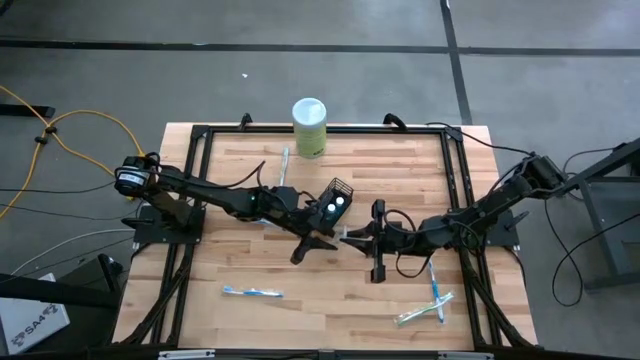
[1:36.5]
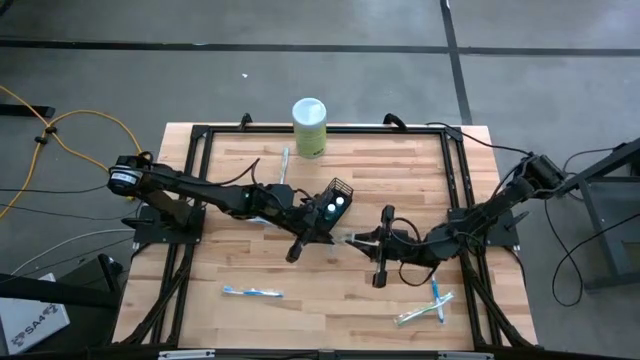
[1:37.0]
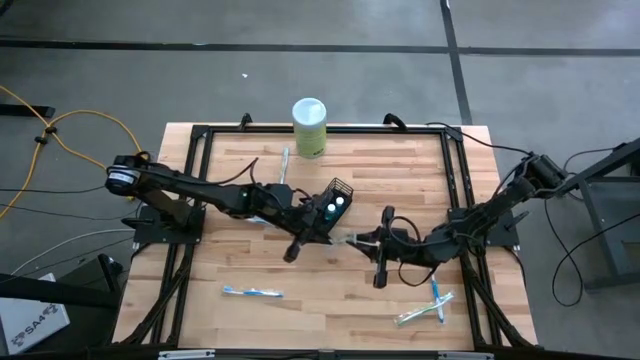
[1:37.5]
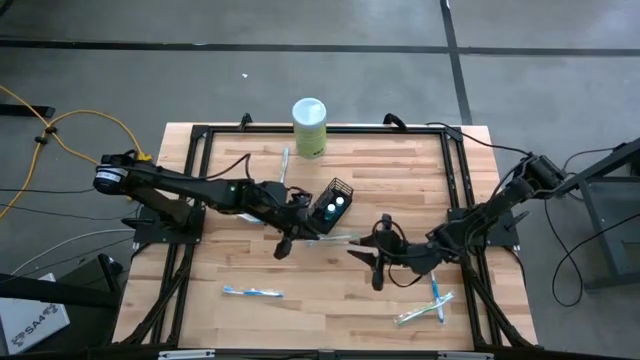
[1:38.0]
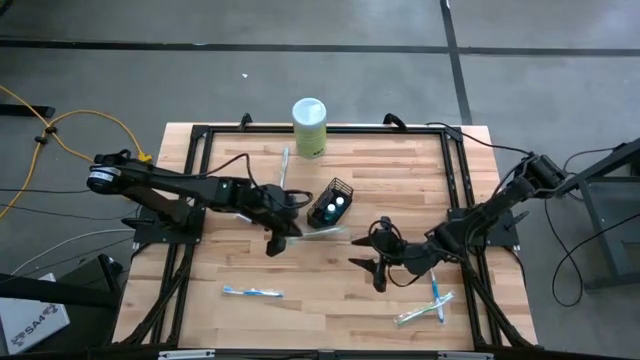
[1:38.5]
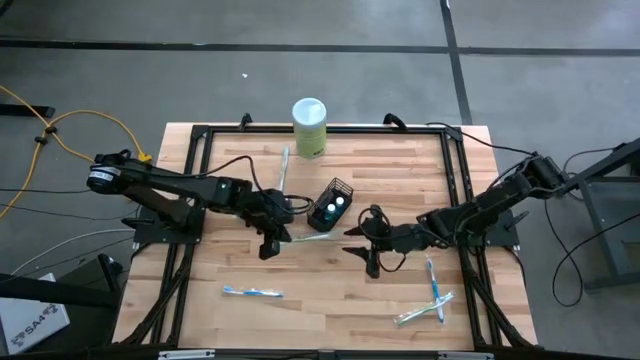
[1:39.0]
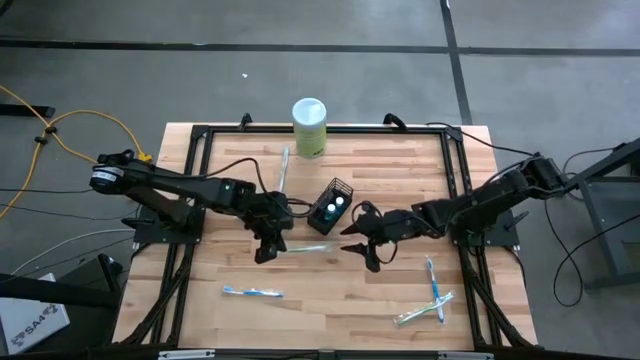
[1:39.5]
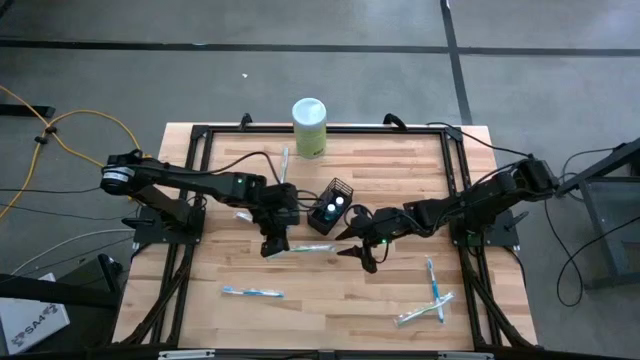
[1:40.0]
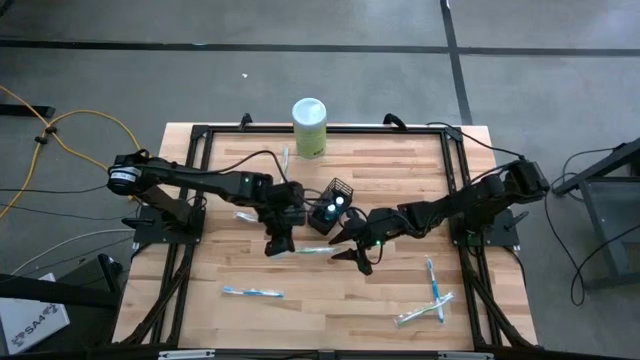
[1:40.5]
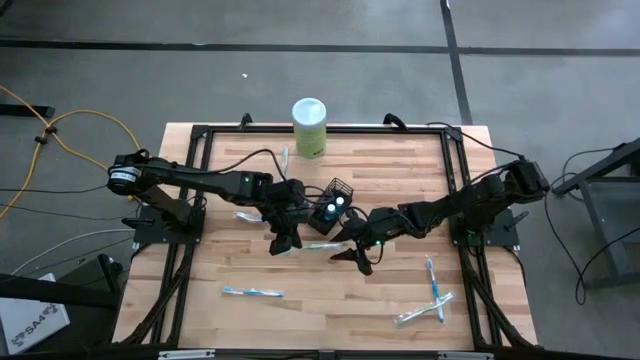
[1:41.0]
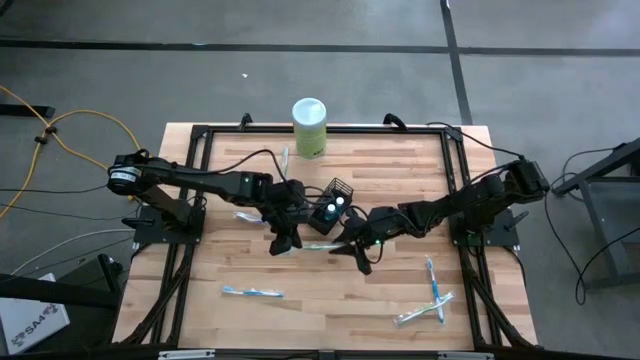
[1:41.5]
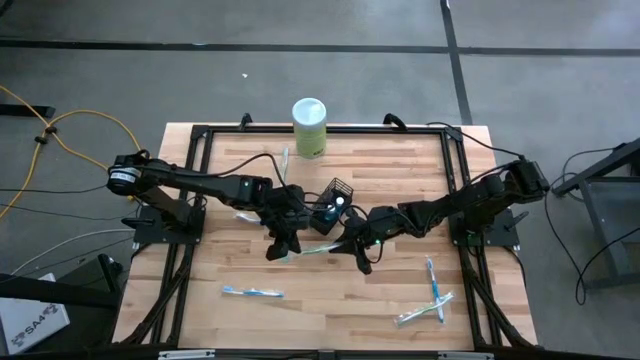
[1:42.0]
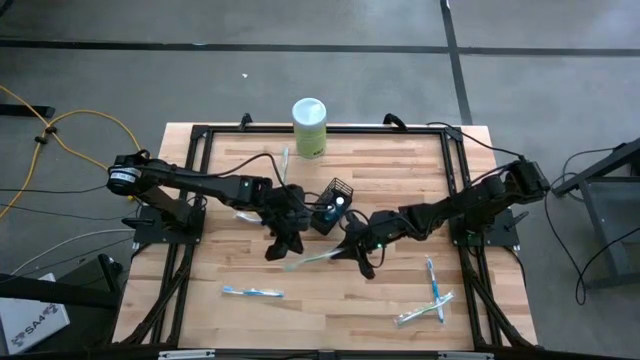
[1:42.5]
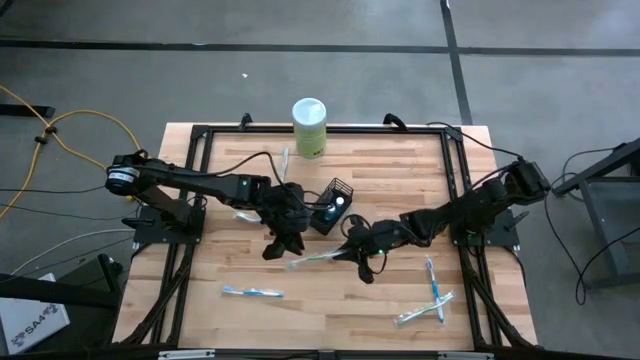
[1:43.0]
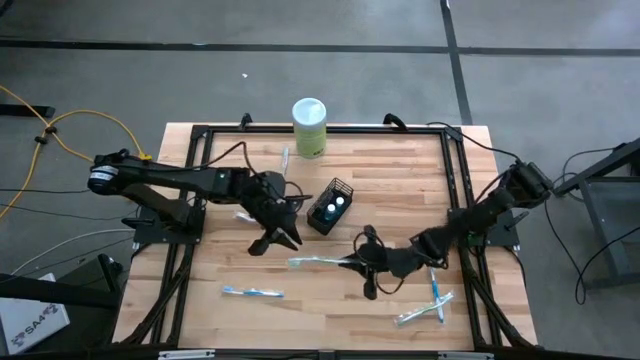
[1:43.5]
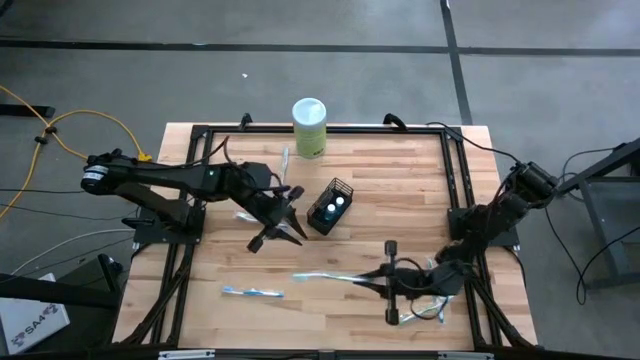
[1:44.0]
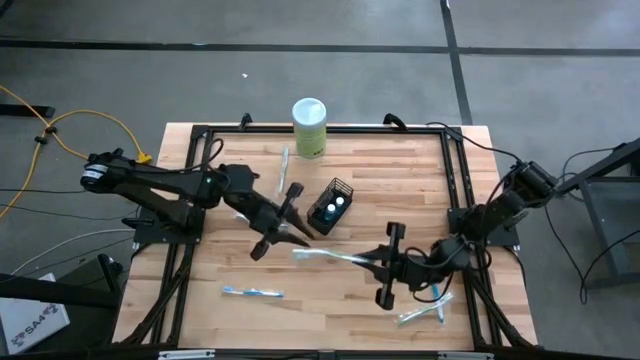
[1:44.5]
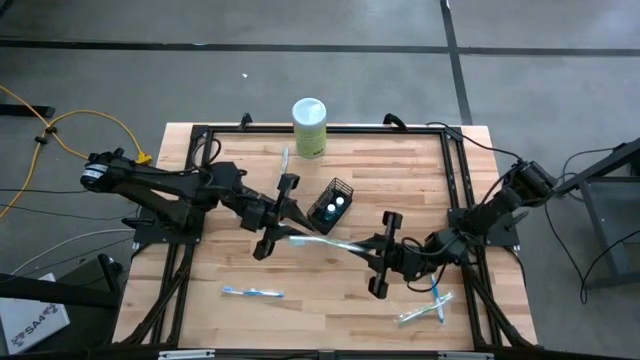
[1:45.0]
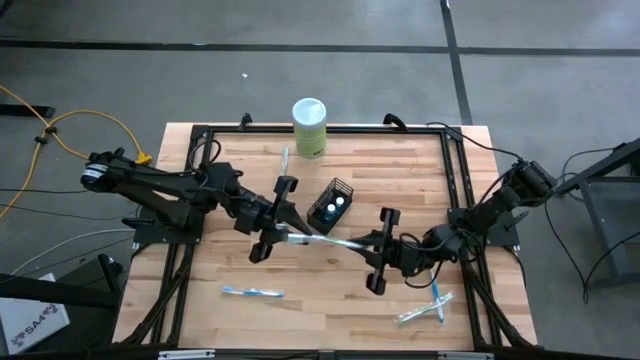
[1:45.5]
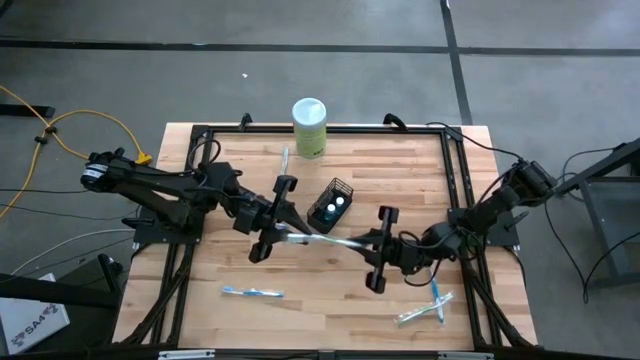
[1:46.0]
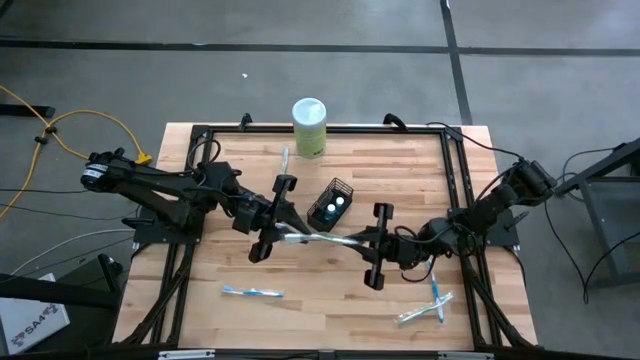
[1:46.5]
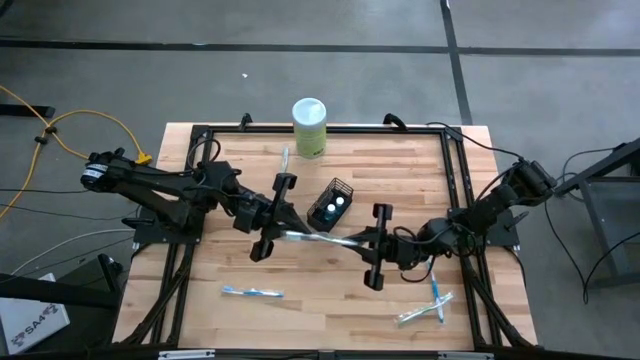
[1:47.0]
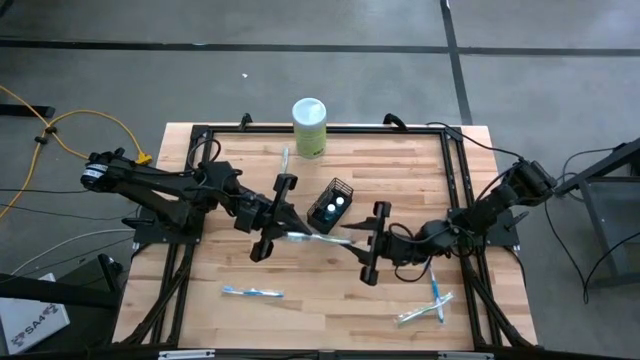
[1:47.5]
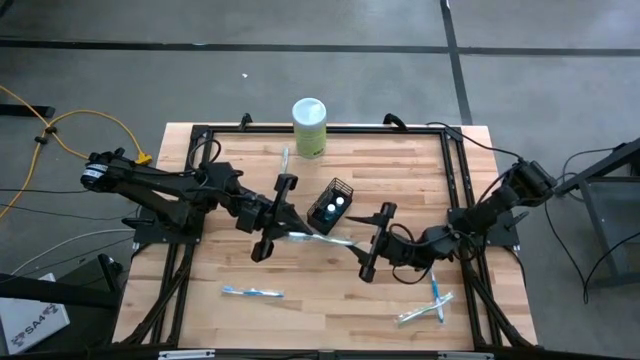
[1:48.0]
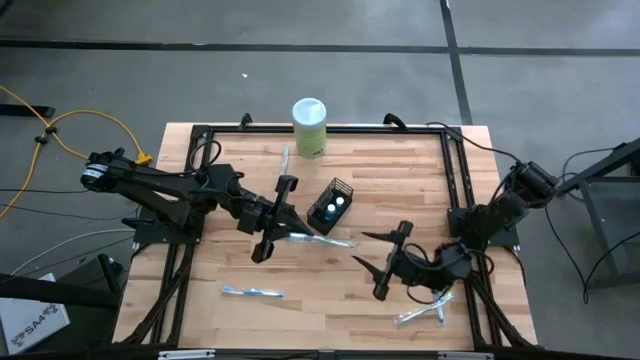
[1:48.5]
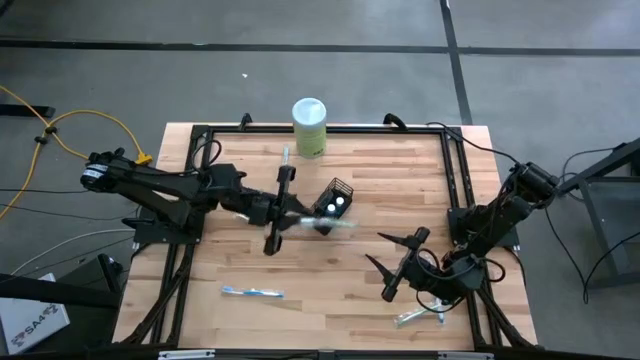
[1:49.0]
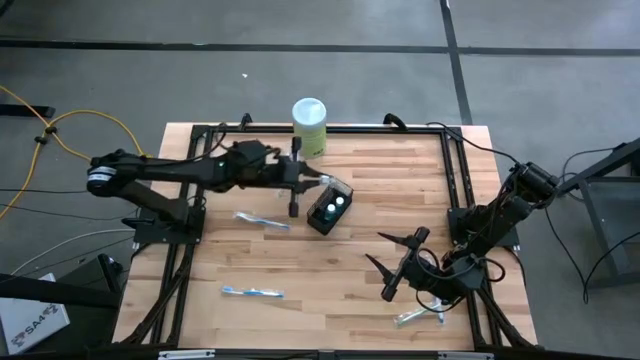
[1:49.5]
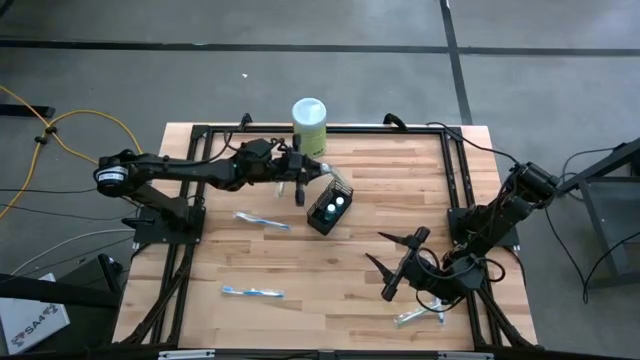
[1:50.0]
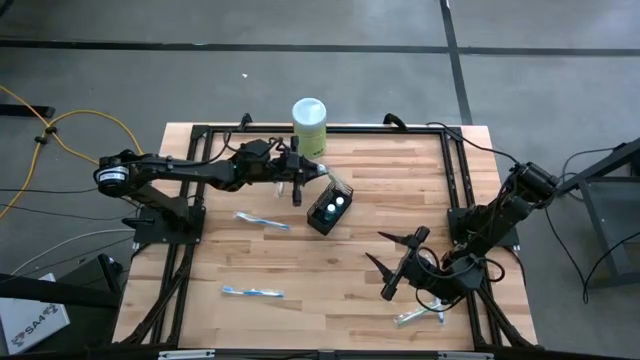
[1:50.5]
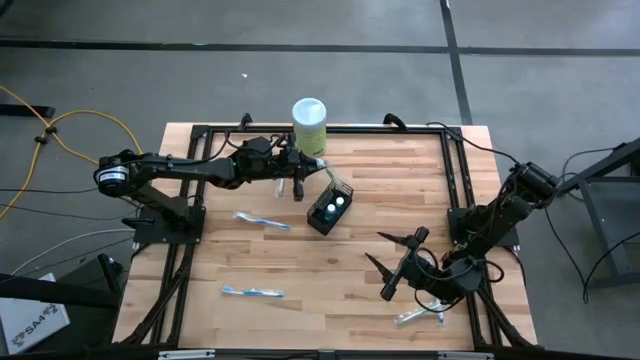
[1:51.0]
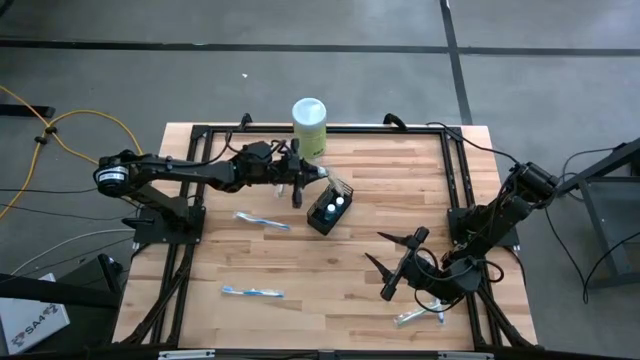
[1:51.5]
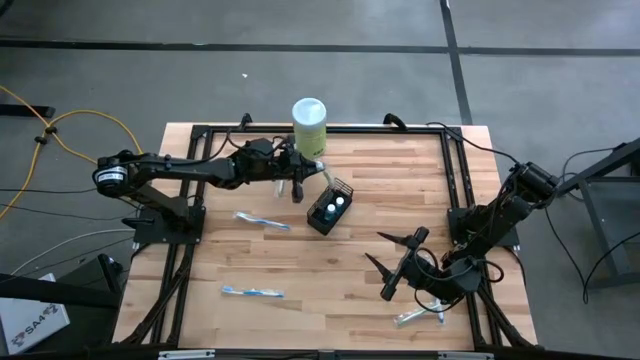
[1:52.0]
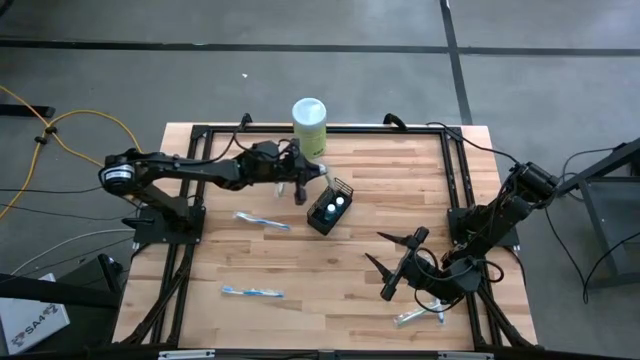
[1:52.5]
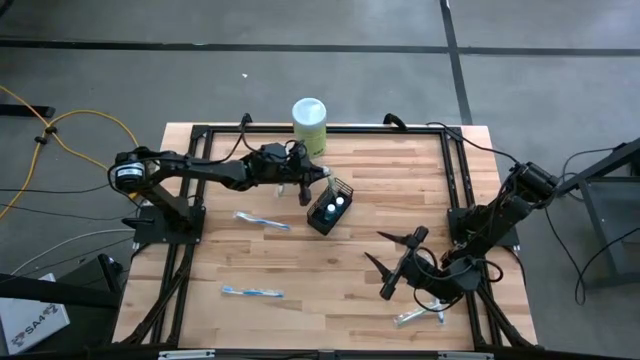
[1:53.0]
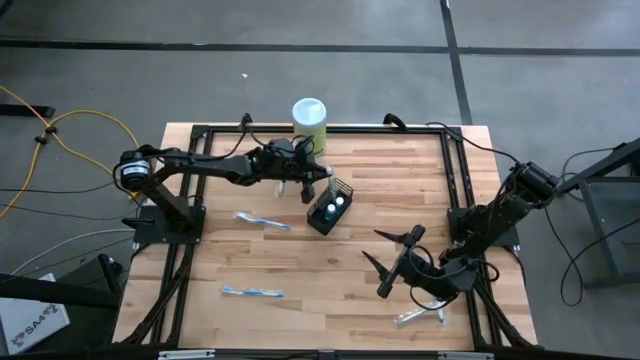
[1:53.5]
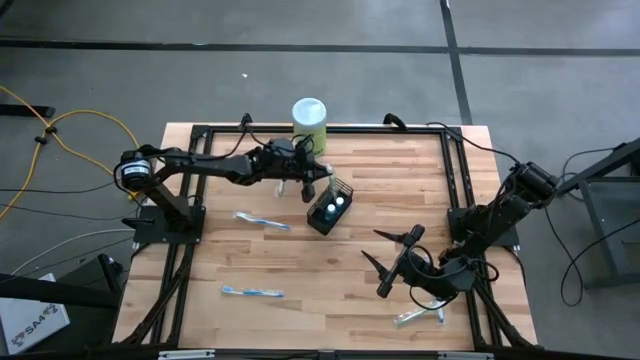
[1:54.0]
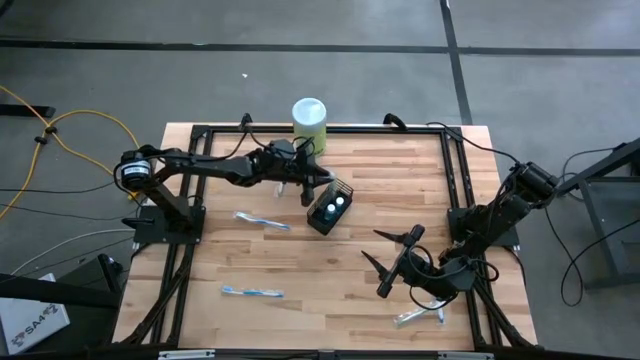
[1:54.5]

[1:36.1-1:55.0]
Task: Pick & Place toothbrushing station
Put the top right green toothbrush into the right section of the black wire organizer
